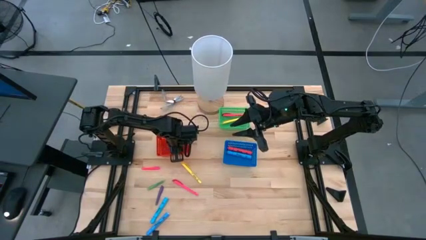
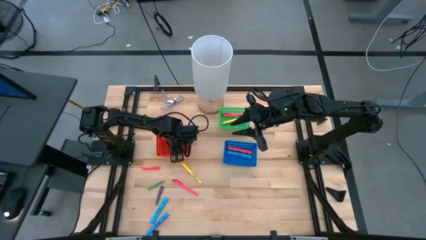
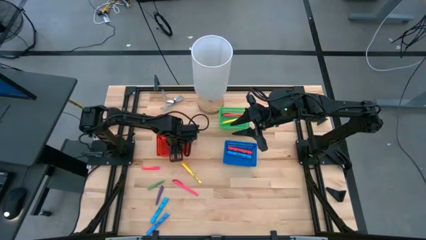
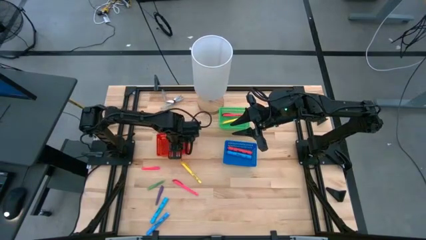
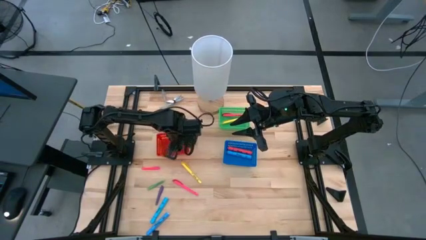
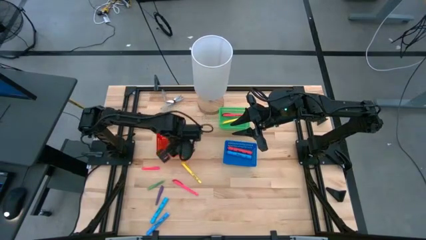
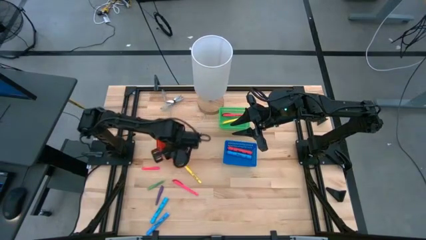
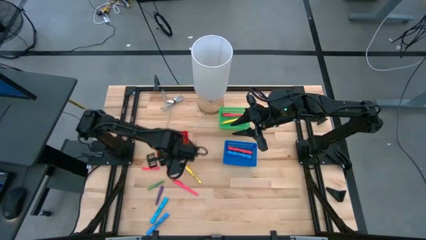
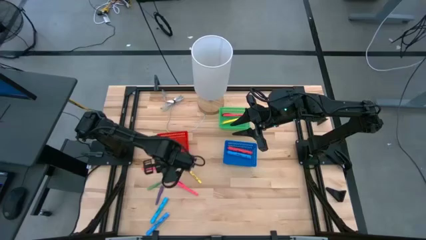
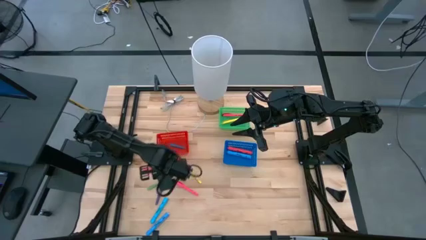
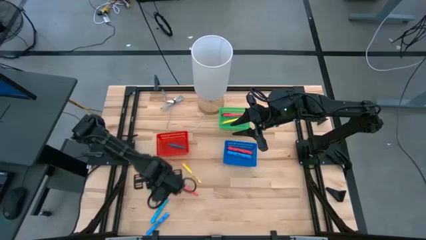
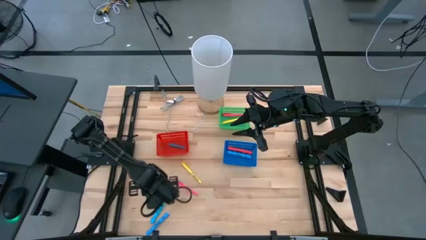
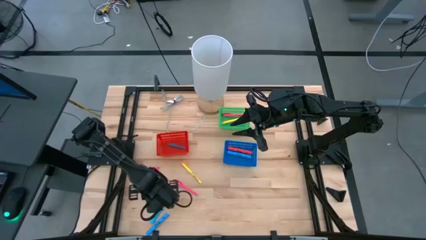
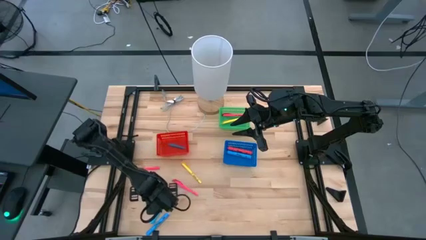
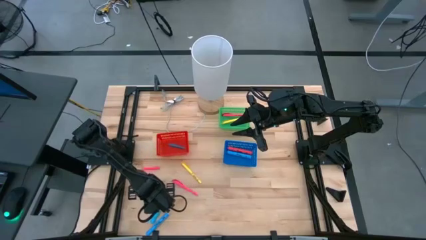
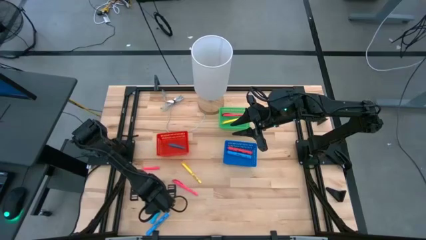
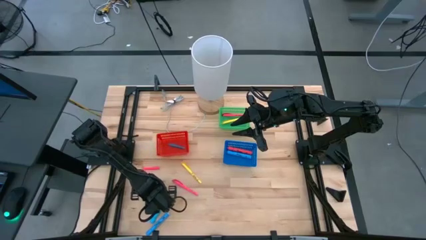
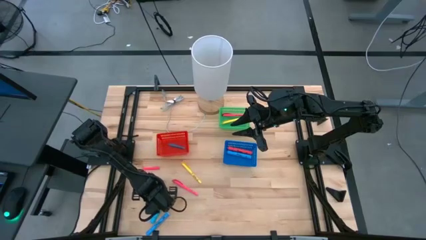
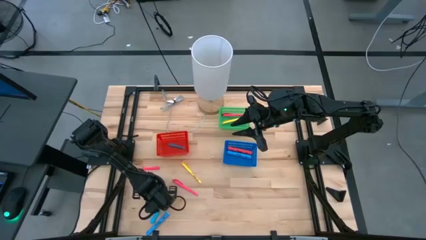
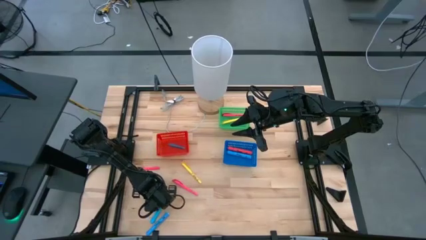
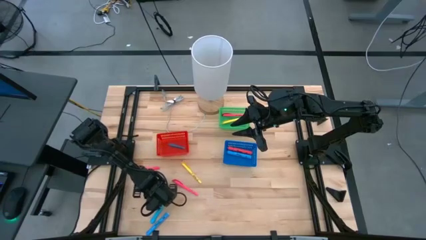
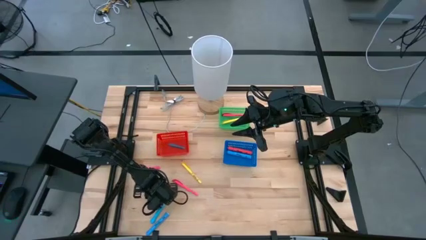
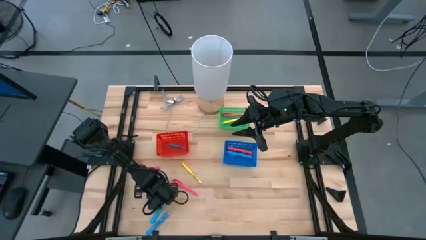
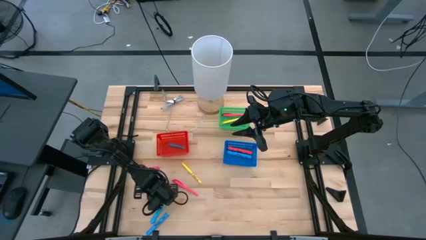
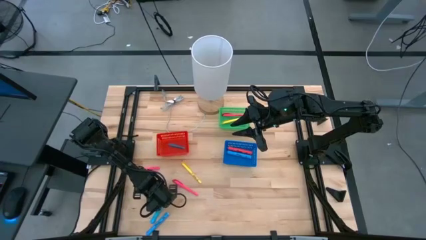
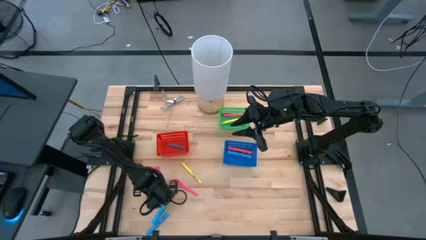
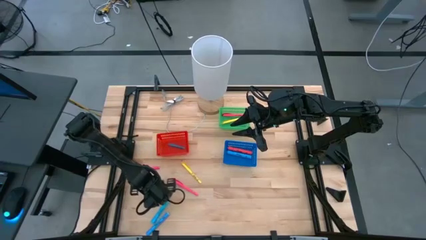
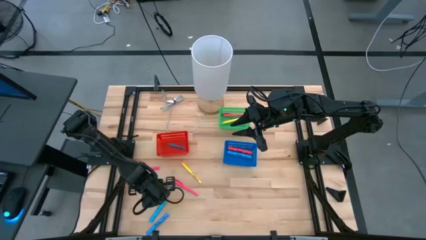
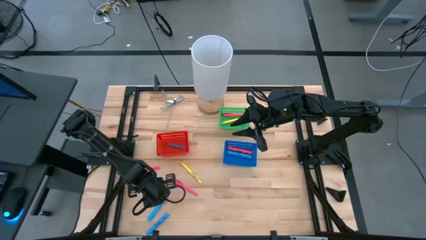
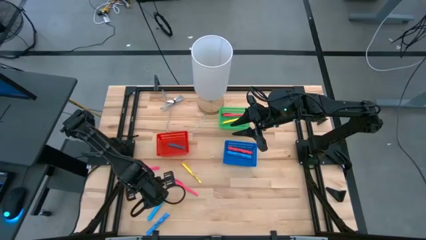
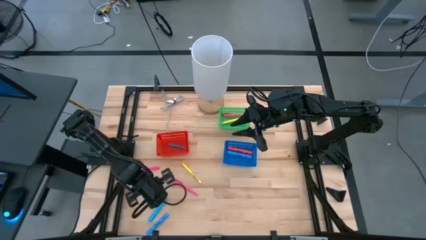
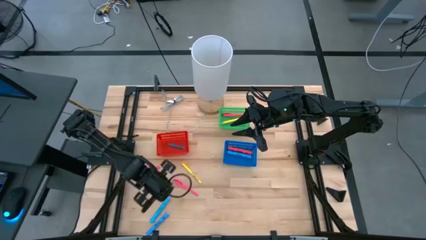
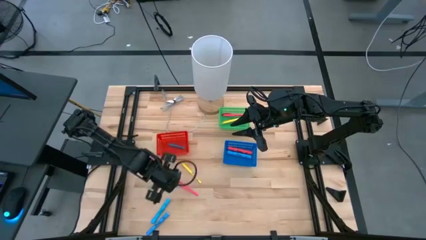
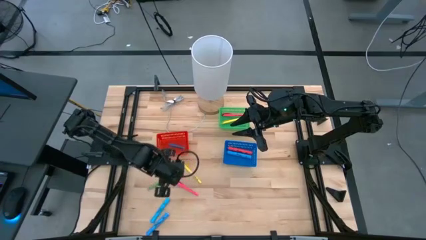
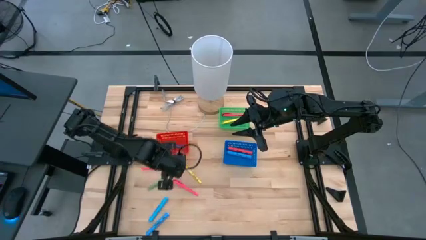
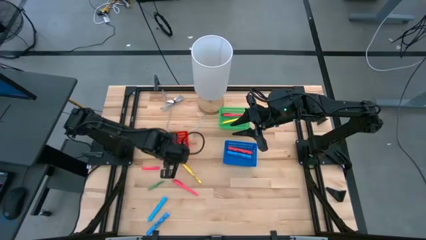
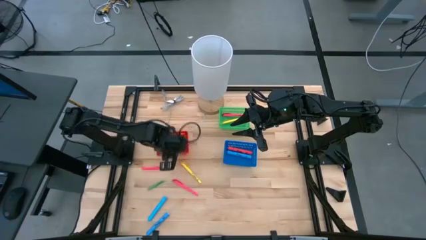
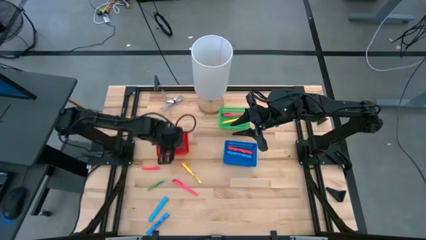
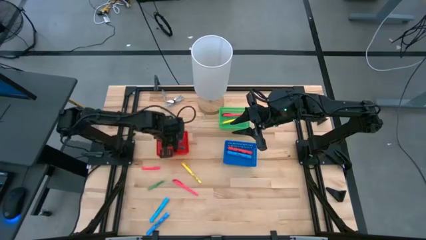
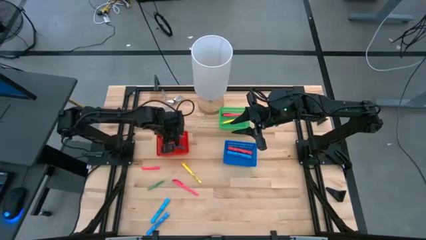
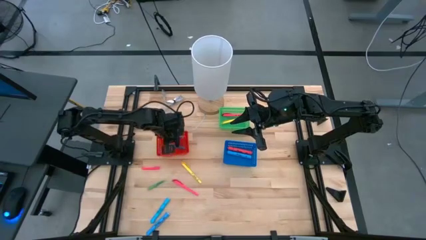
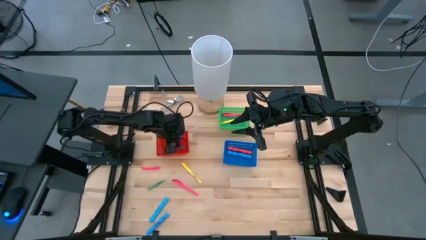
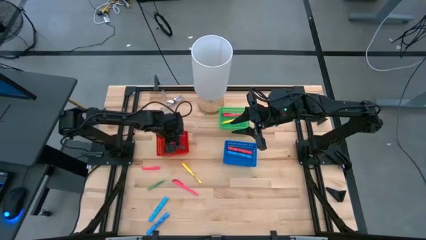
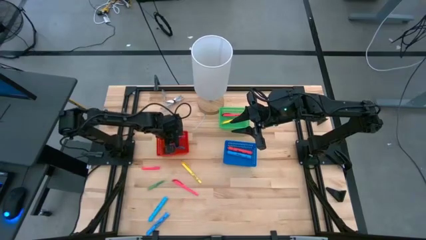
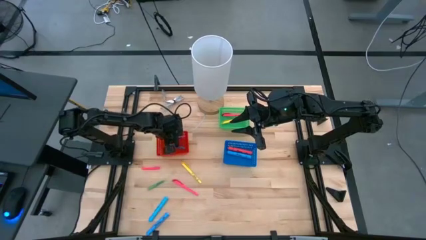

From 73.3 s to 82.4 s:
Task: Pick & Place Markers
Put the small purple pen into the red bin
